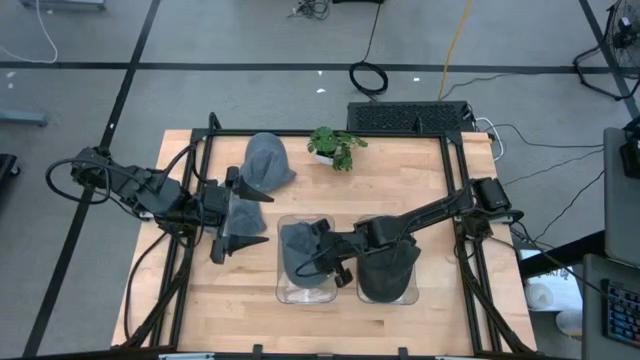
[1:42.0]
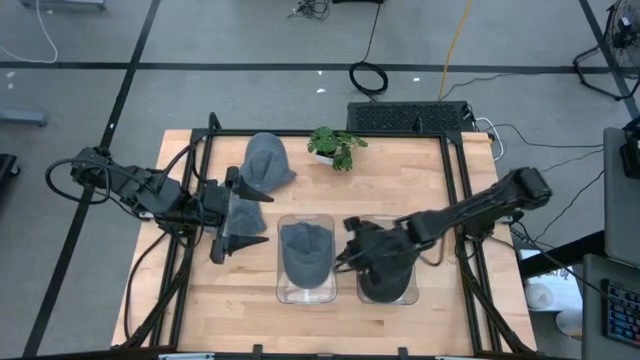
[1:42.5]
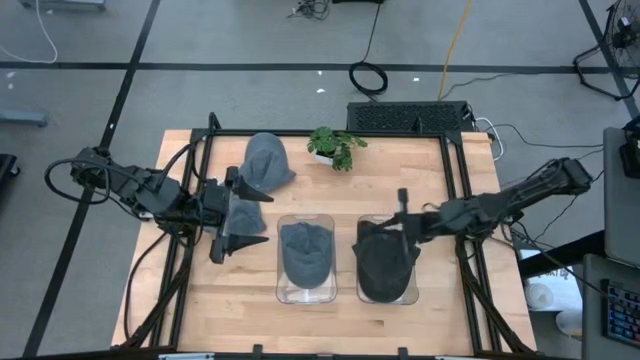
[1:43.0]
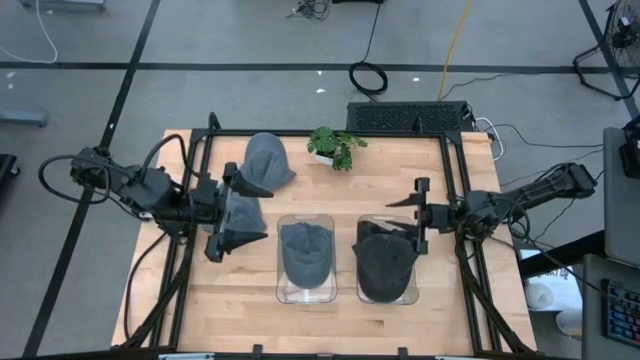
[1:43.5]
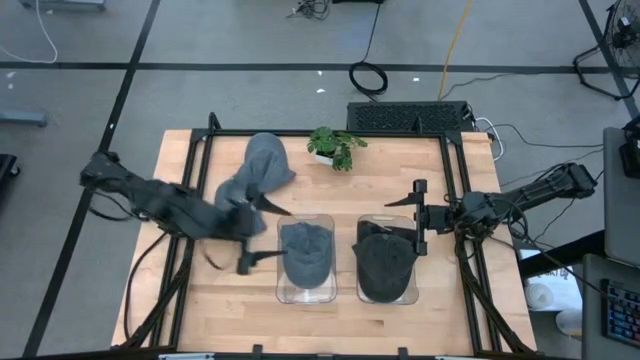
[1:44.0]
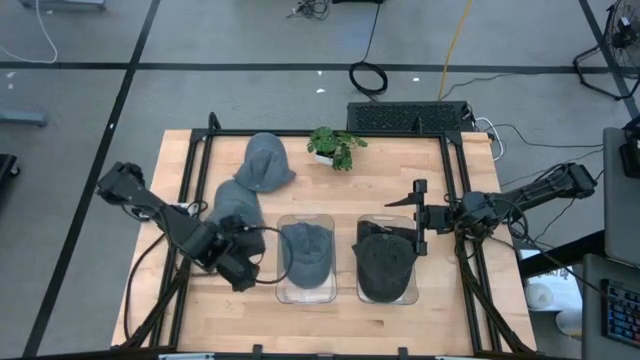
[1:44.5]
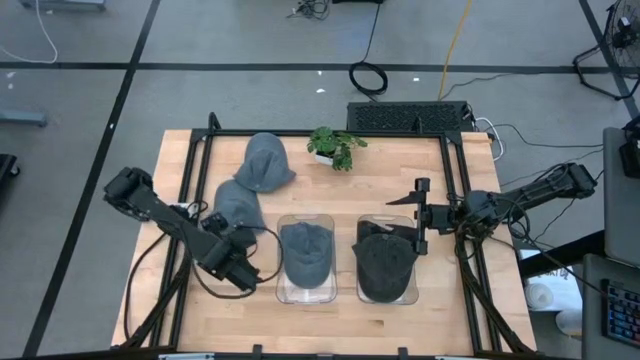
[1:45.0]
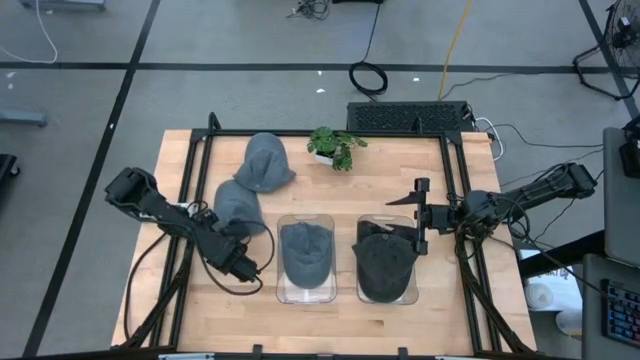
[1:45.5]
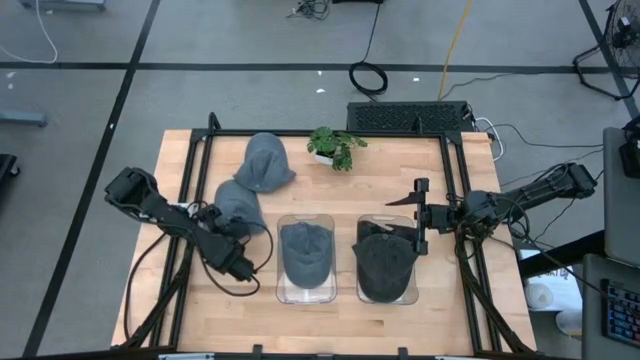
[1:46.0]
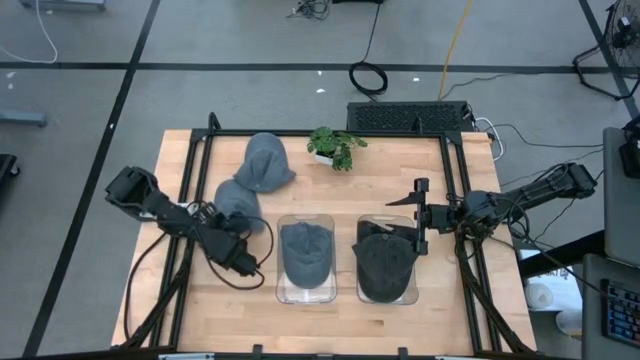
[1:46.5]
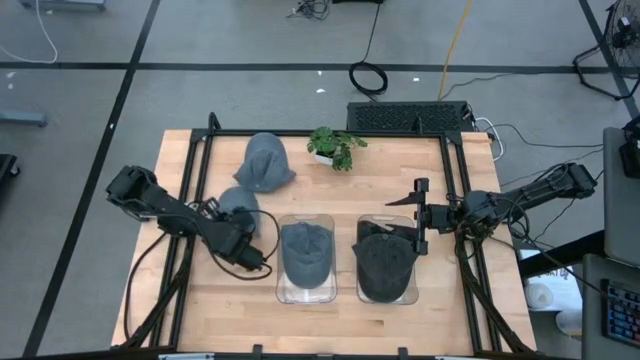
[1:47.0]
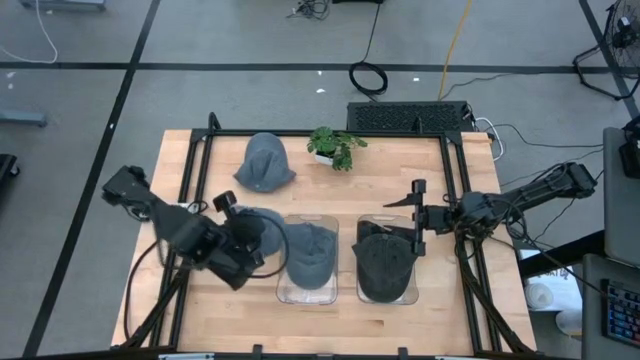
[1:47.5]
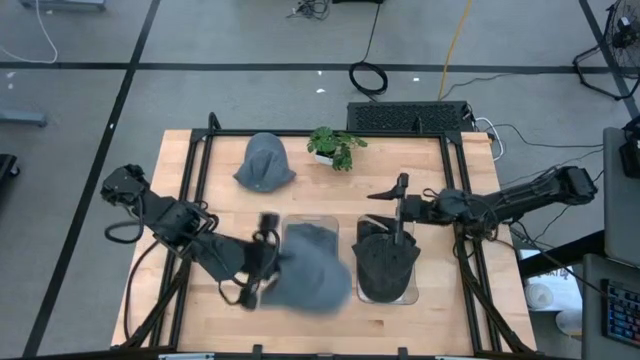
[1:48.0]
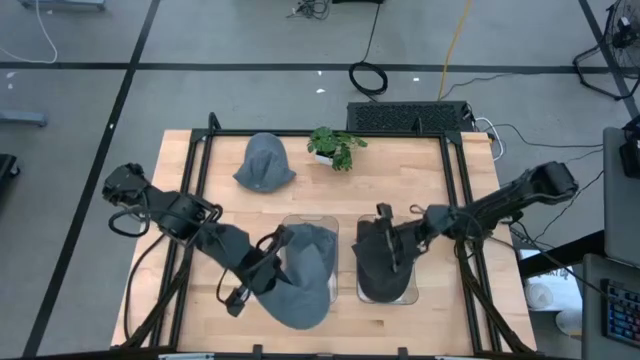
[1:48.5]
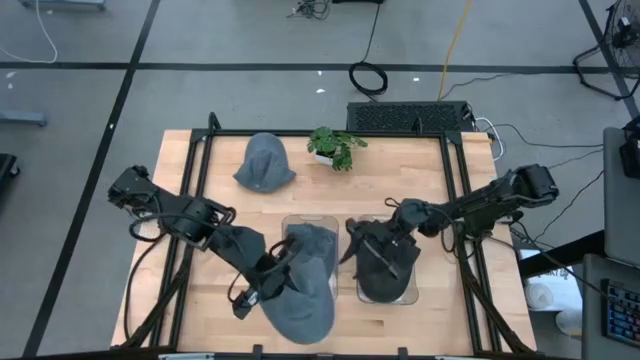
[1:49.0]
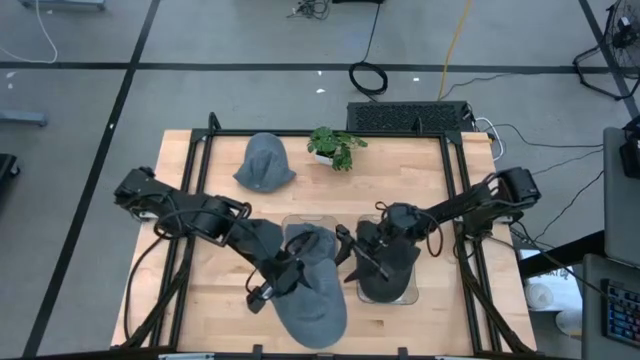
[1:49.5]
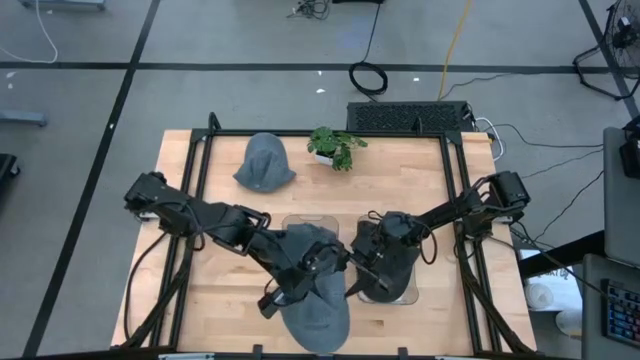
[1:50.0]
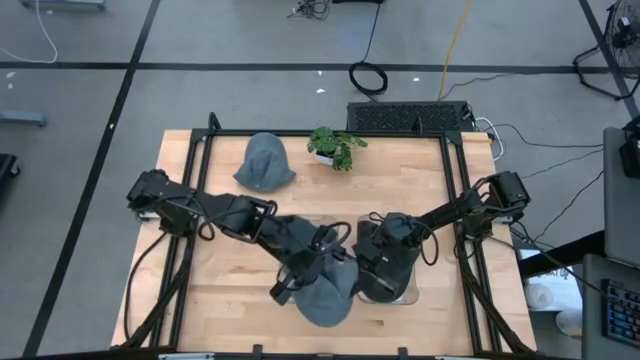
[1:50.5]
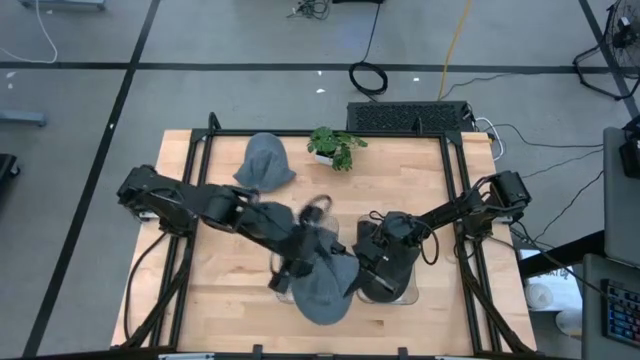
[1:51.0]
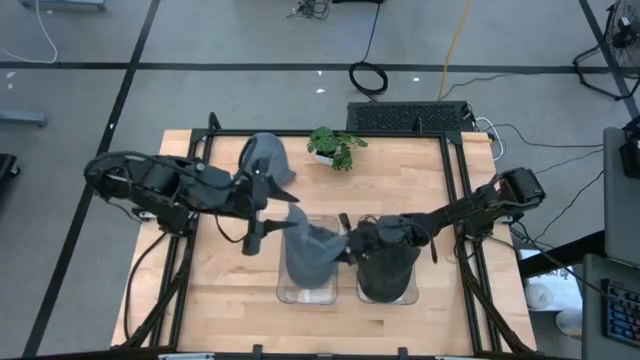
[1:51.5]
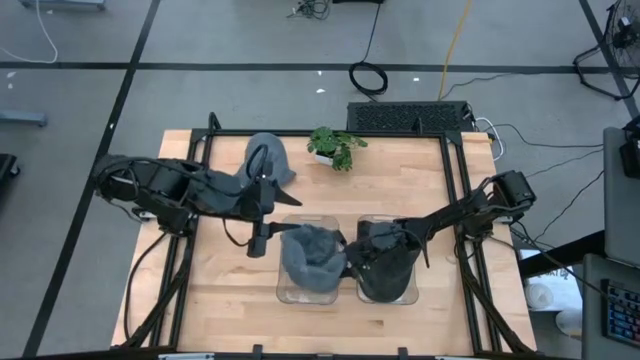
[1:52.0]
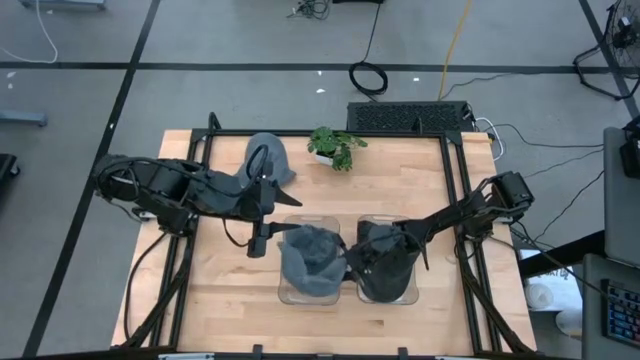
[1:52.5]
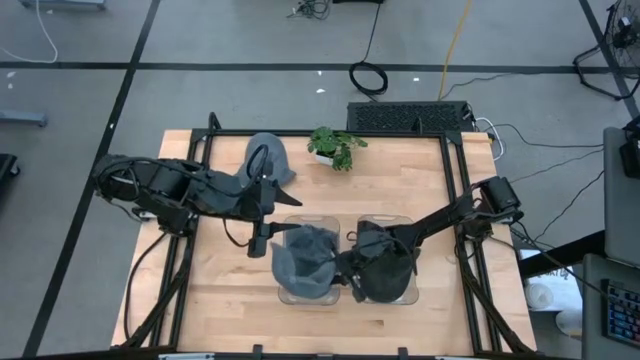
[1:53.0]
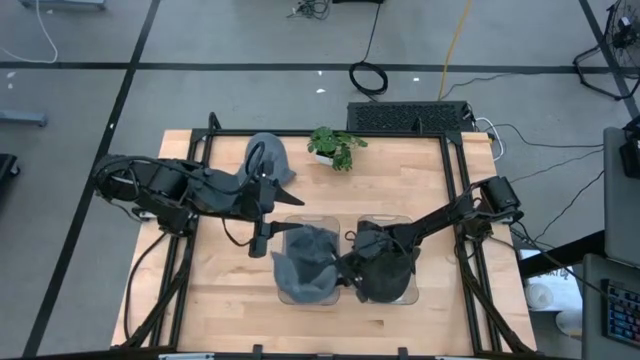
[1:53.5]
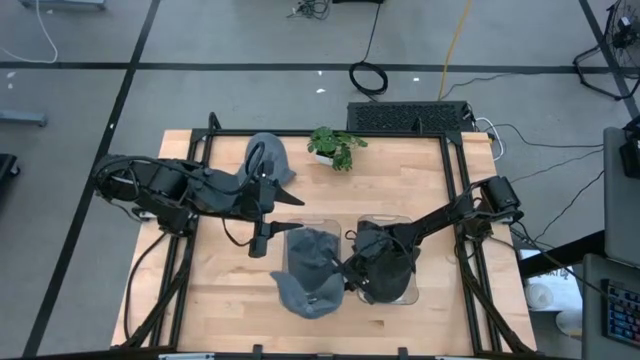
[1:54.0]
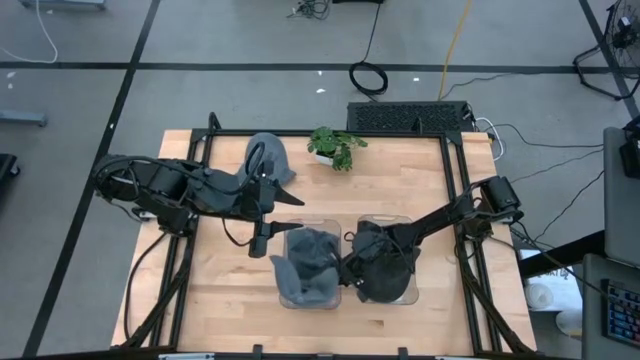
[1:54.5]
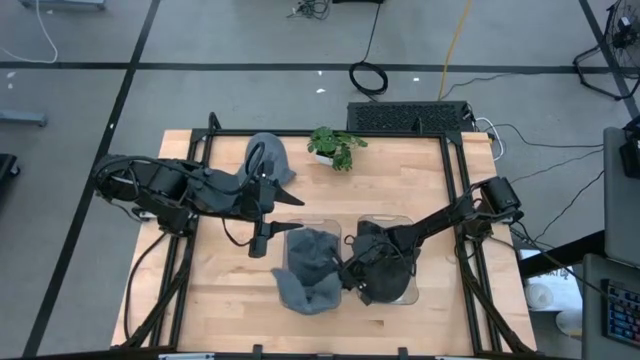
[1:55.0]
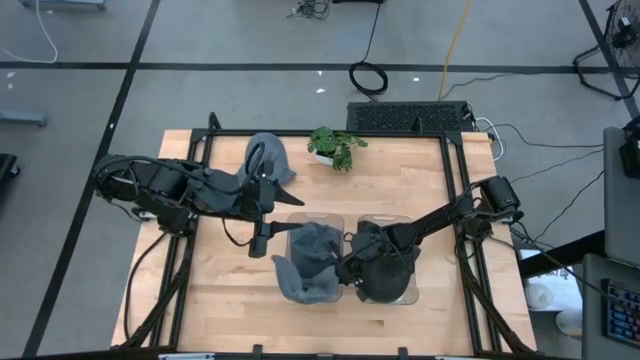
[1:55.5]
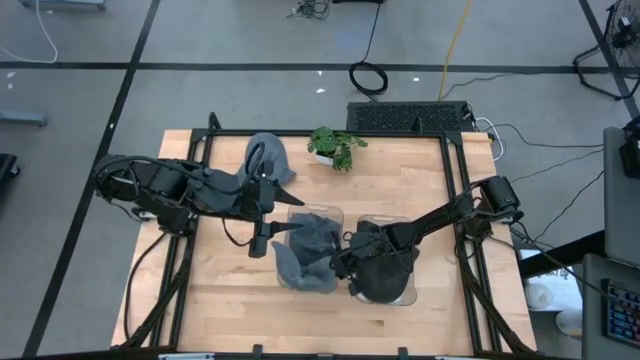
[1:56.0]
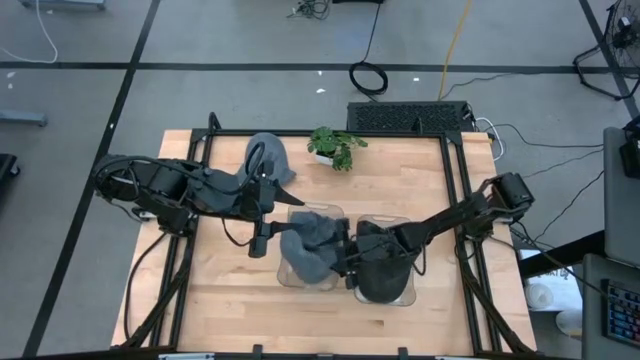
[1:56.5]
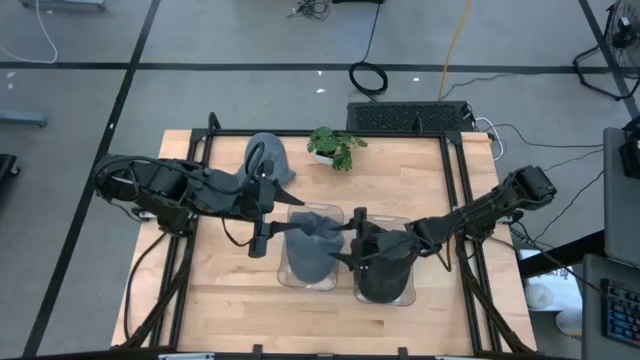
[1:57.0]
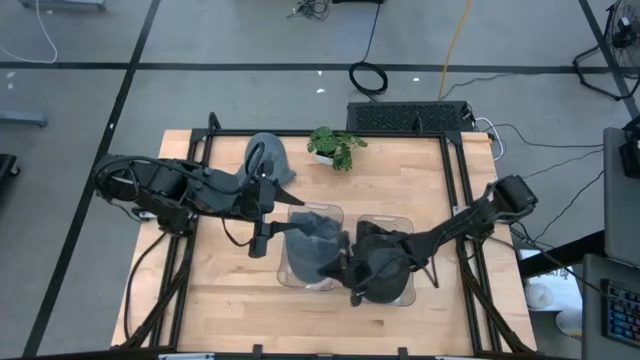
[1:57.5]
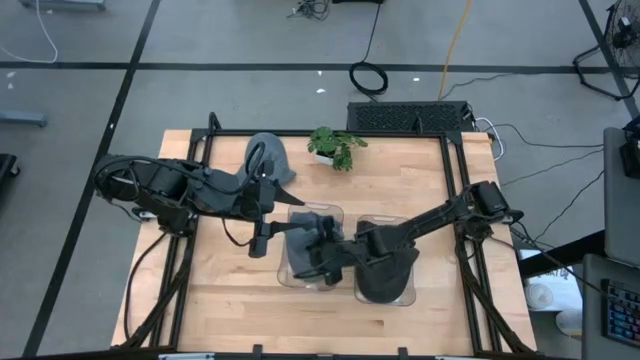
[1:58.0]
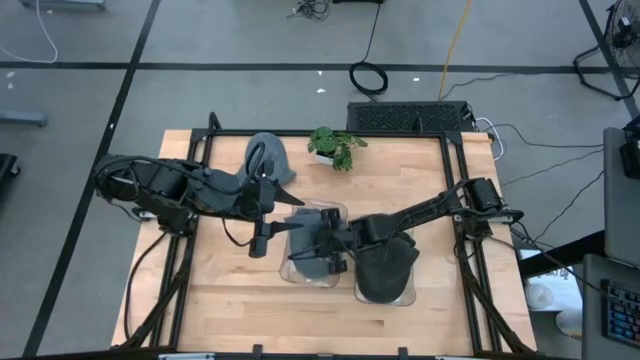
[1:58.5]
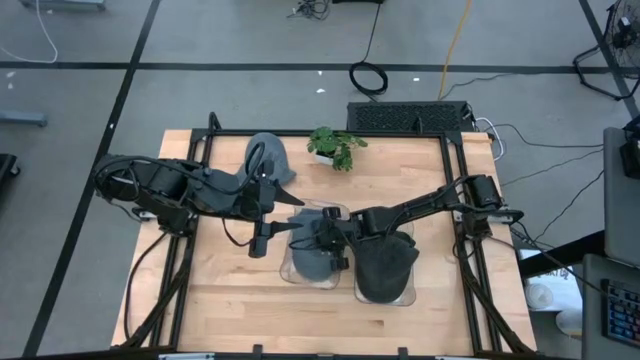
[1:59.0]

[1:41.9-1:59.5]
Task: Pick & Place hat
Put the bottom gray cap into the left transparent bin

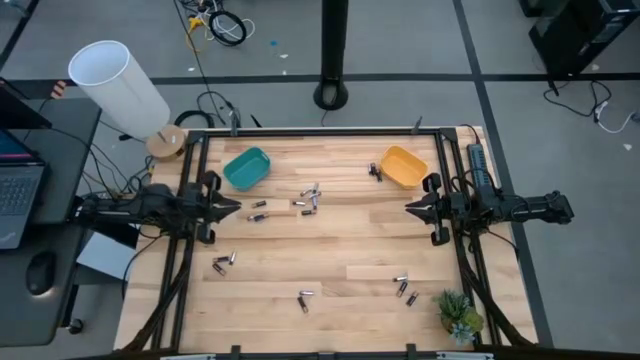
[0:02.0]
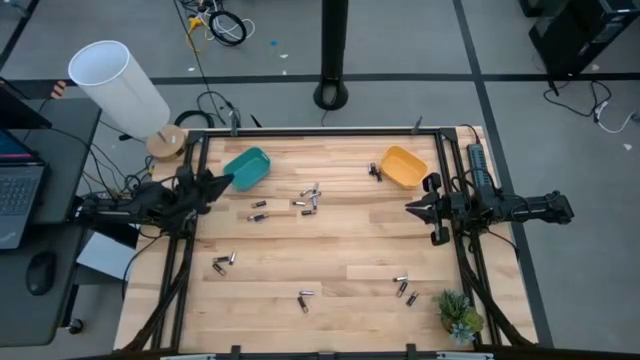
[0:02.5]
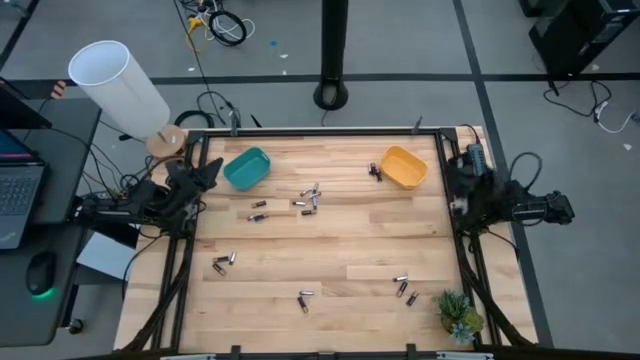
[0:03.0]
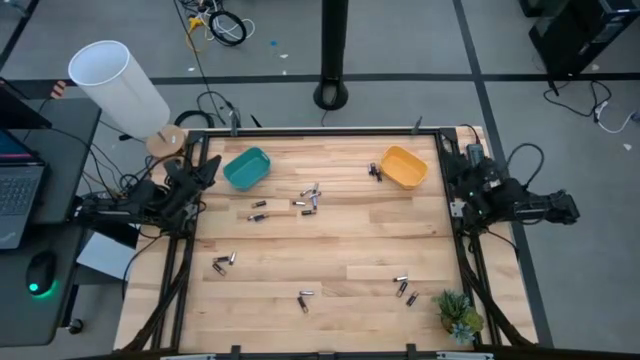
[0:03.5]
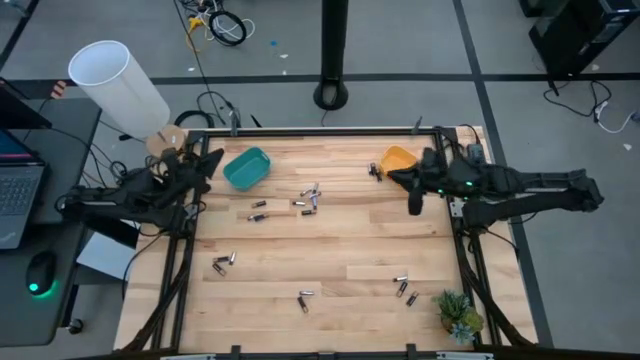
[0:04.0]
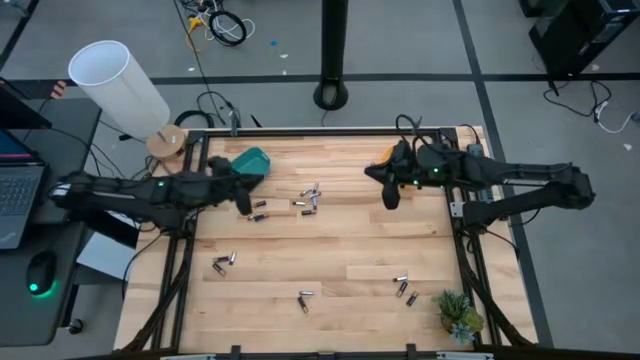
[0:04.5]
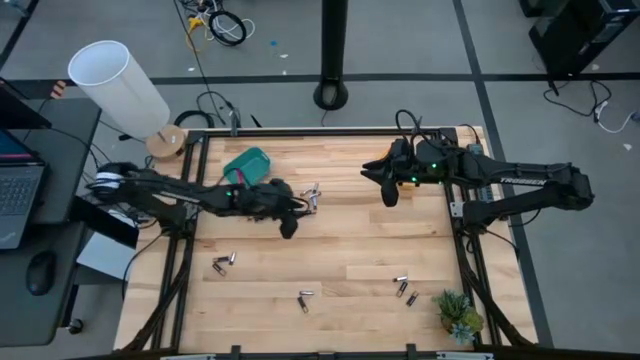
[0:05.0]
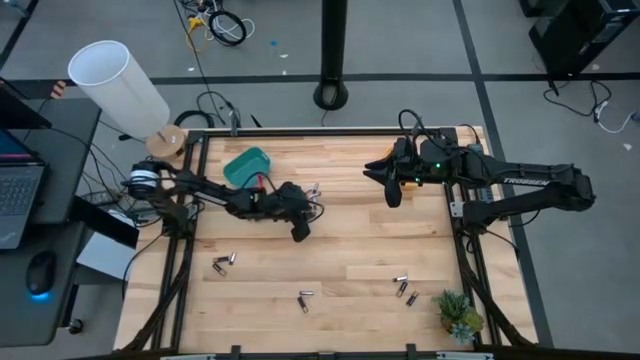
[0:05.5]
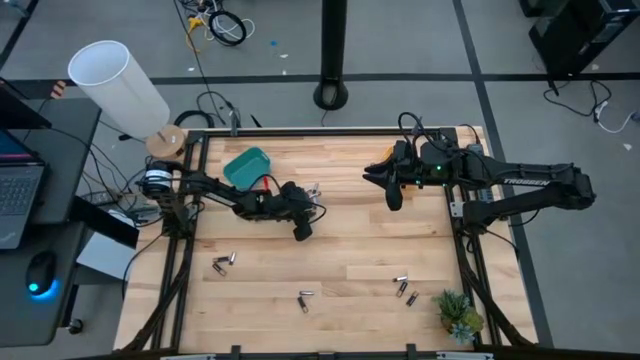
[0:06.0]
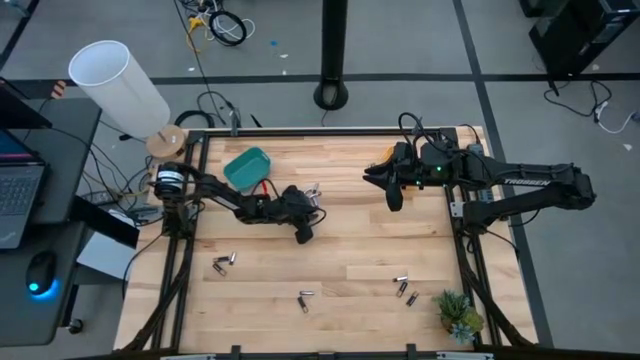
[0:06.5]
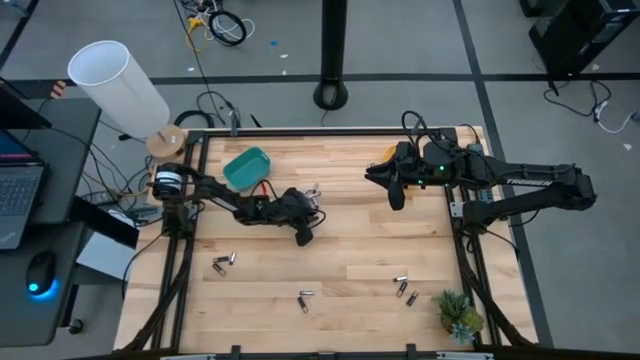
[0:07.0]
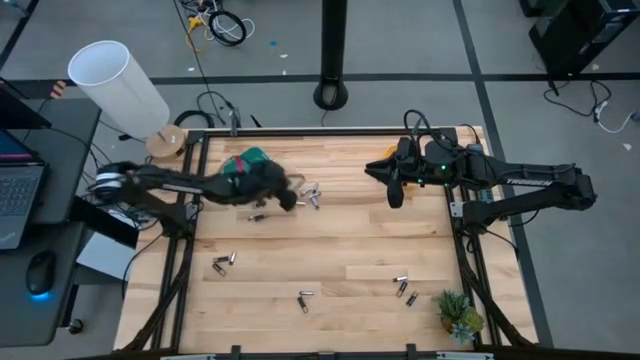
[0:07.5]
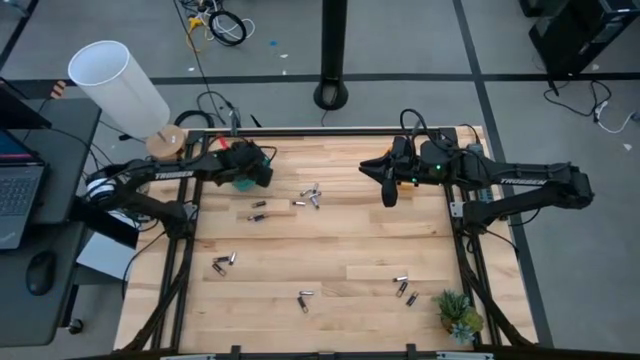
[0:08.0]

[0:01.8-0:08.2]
Task: Sort batteries
Put the black battery into the blue bin
